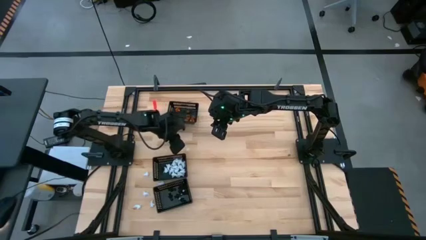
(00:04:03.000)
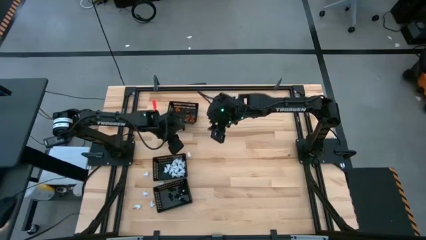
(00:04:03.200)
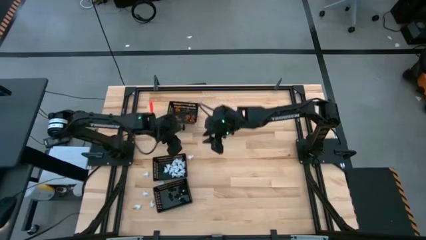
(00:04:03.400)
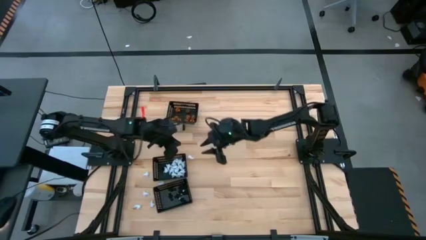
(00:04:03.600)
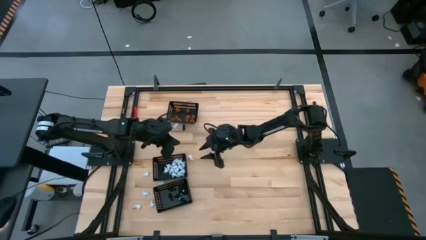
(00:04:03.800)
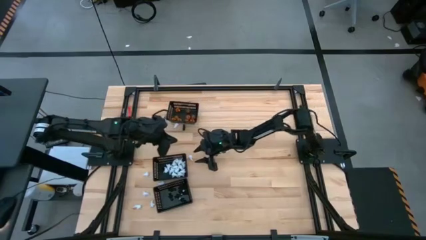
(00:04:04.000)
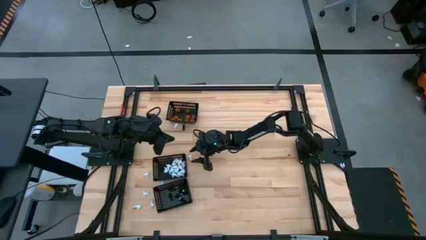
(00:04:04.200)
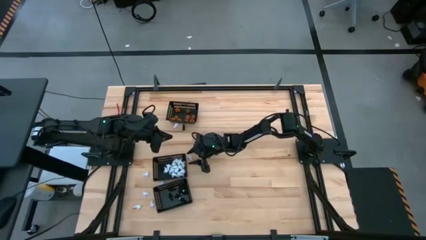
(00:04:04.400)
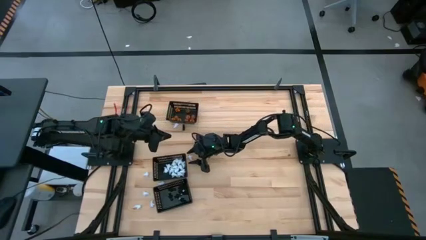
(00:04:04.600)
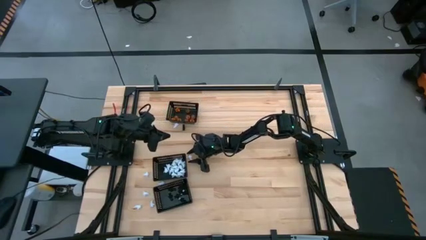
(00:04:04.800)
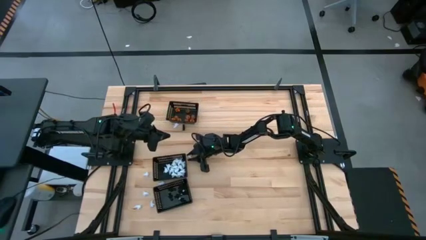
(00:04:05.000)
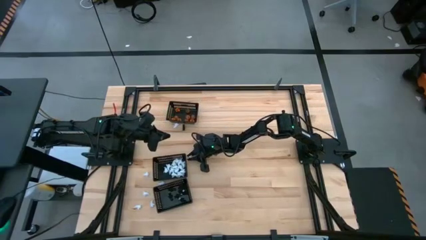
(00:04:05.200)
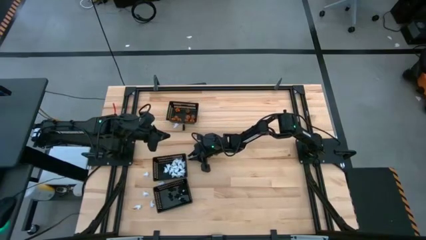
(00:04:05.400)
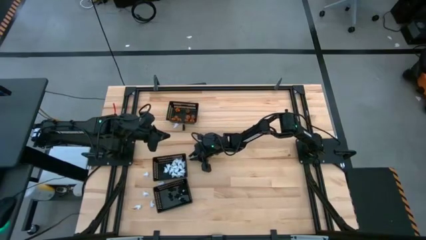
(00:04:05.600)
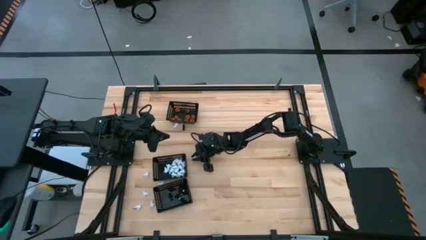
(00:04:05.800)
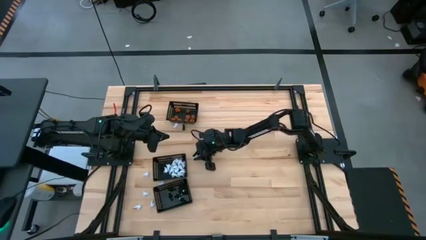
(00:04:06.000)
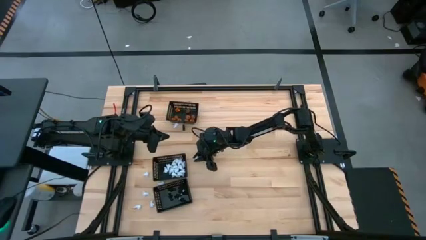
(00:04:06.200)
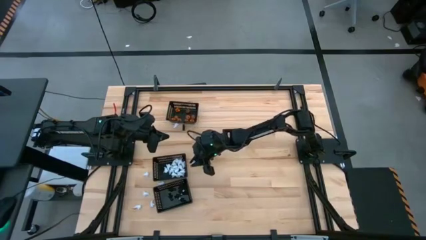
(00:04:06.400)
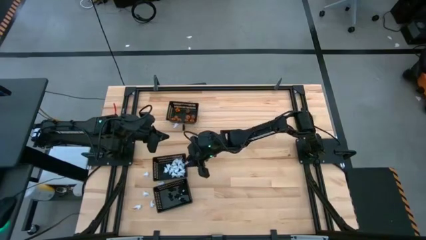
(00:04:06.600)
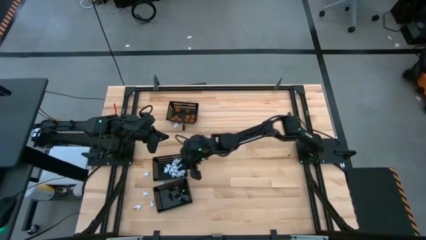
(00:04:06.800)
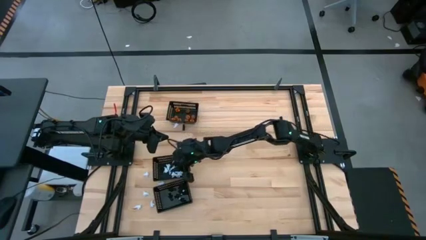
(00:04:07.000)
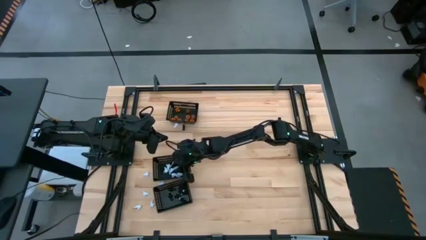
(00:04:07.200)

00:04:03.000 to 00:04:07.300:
Task: Sort Halloween decoration
Put the white toy into the middle black bin

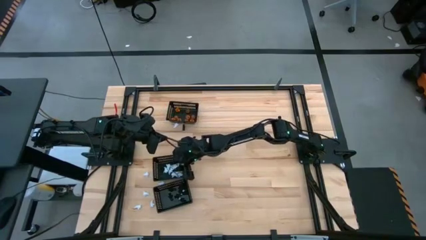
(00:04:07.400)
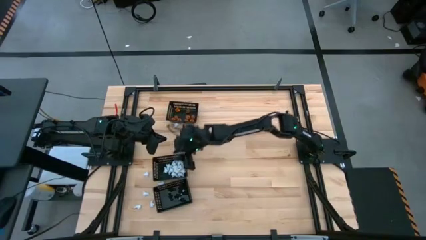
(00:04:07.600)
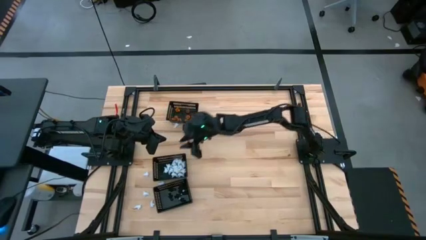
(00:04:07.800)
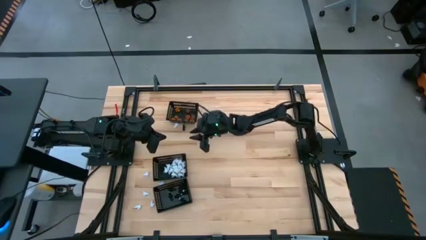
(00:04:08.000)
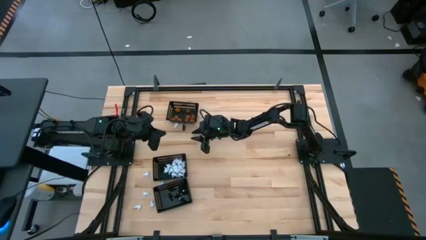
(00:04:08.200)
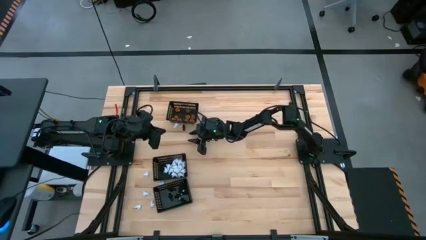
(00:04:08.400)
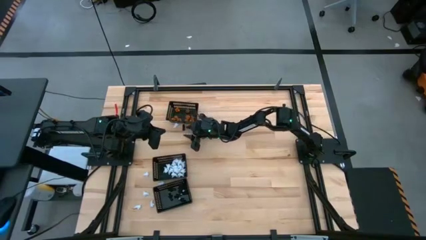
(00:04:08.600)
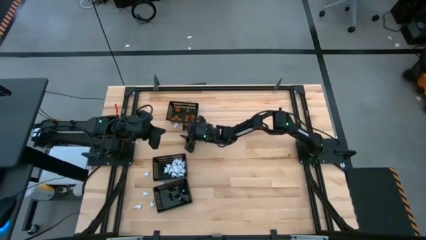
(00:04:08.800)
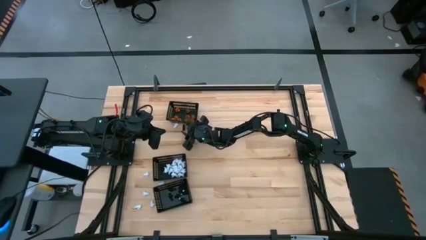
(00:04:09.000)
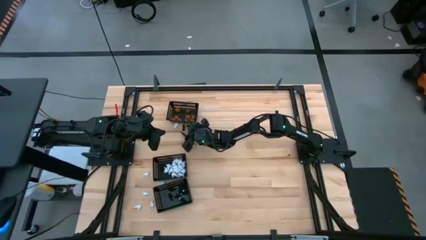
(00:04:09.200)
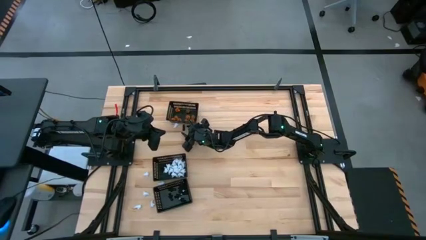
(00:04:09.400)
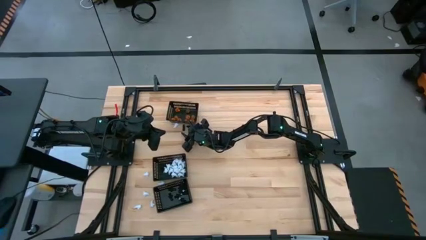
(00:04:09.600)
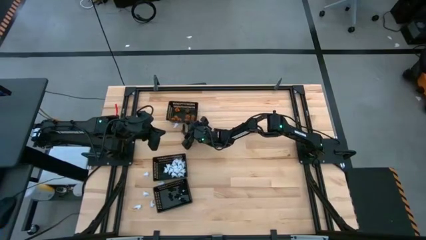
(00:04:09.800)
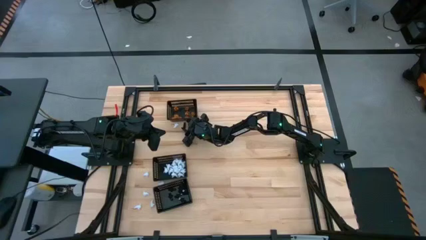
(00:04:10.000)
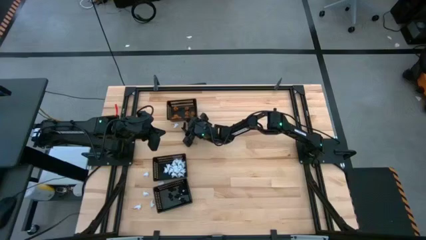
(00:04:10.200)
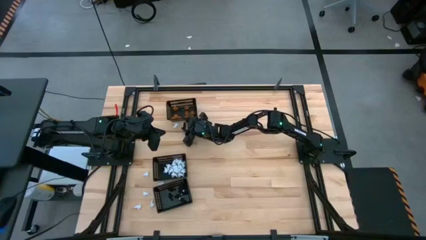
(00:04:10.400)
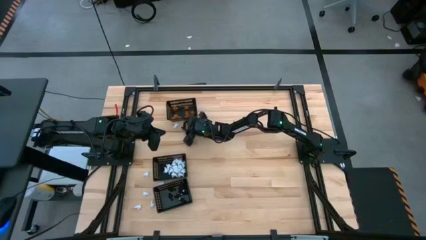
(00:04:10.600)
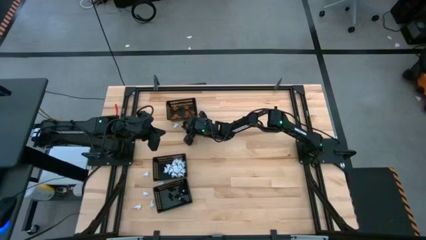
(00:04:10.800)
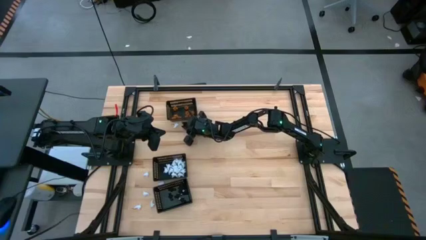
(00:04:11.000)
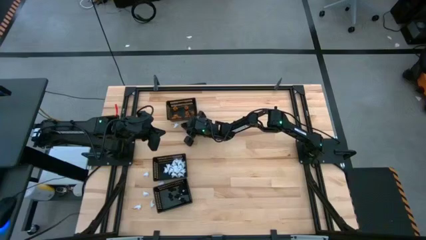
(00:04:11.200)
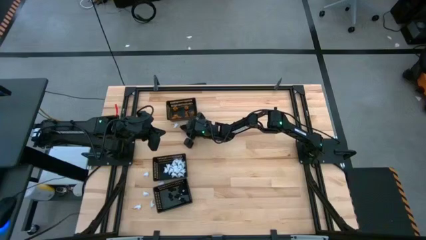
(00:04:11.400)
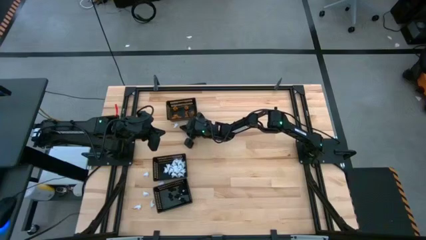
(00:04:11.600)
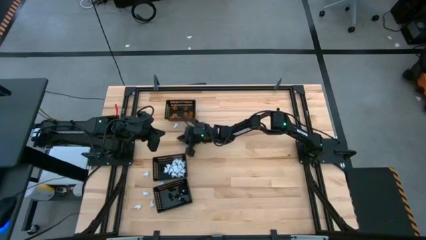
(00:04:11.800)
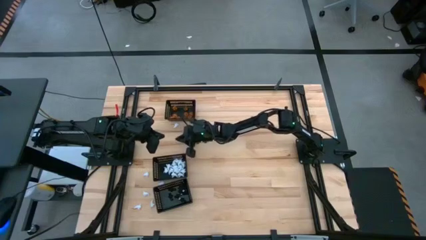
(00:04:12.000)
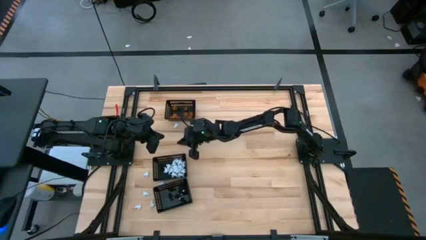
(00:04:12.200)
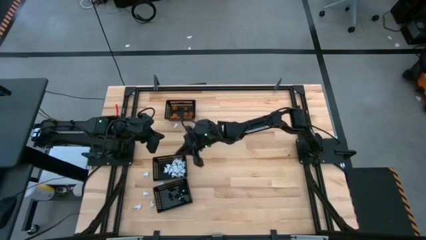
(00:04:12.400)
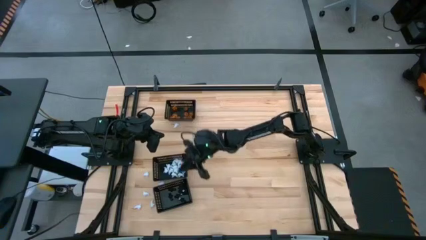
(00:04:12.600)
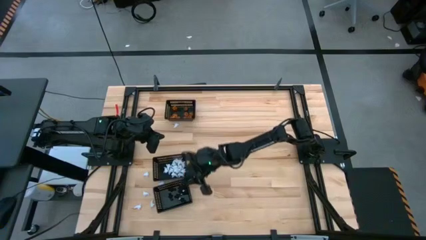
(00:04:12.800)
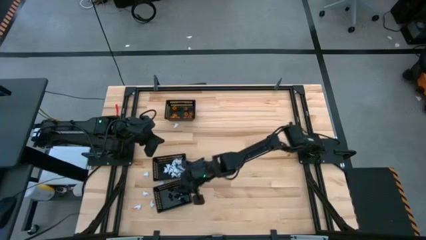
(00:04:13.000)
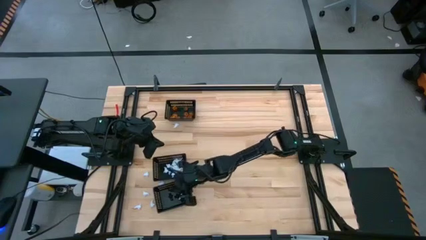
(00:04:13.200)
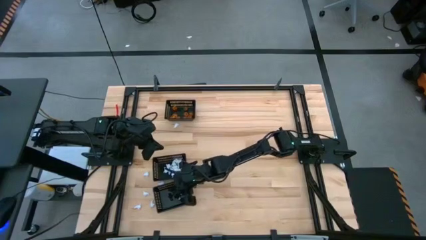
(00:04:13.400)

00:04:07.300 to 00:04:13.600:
Put the black skeleton toy into the bottom black bin

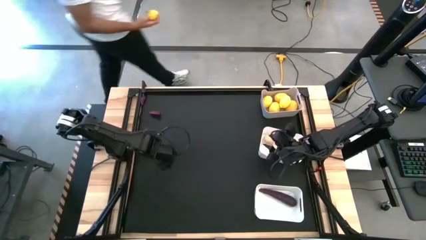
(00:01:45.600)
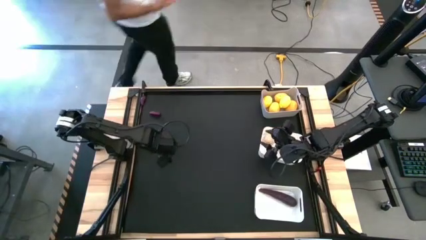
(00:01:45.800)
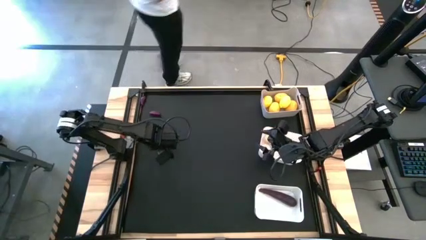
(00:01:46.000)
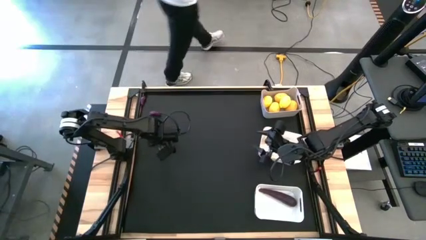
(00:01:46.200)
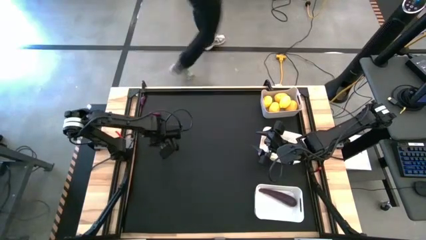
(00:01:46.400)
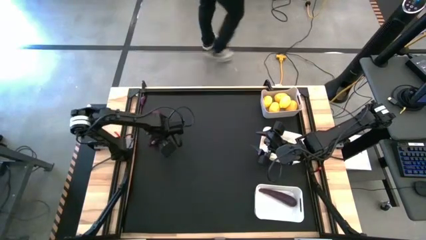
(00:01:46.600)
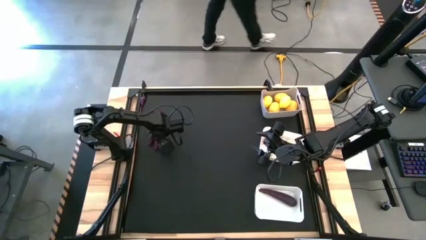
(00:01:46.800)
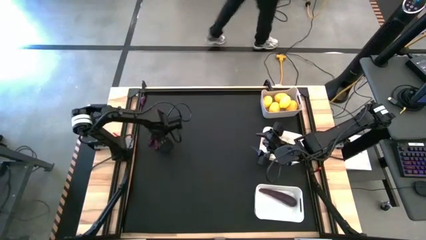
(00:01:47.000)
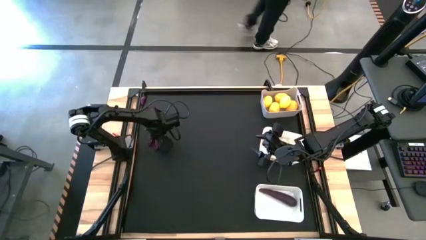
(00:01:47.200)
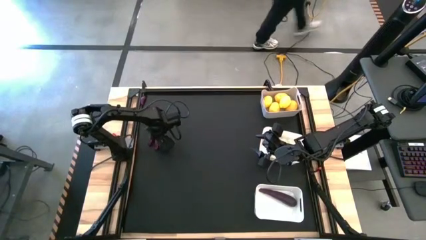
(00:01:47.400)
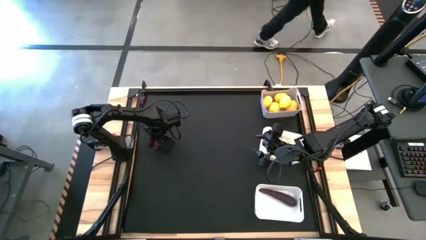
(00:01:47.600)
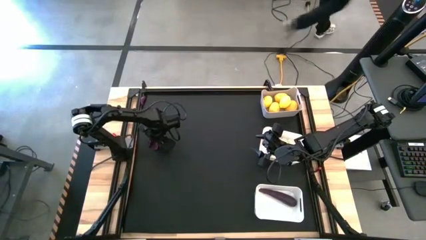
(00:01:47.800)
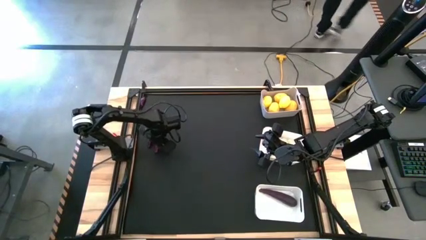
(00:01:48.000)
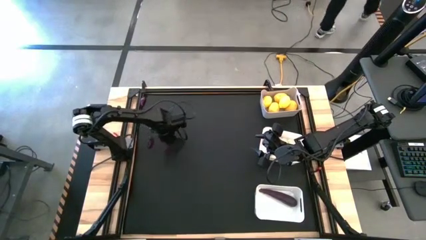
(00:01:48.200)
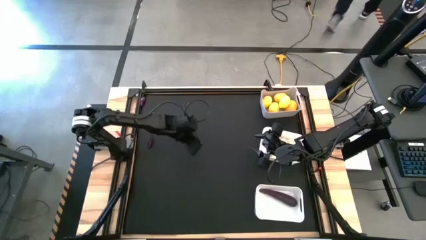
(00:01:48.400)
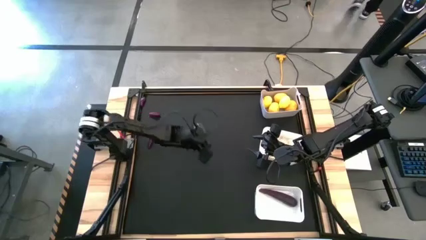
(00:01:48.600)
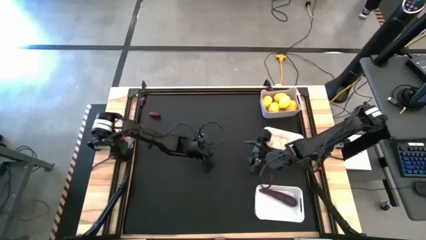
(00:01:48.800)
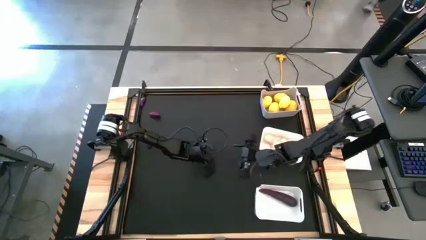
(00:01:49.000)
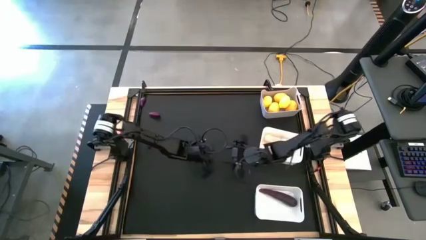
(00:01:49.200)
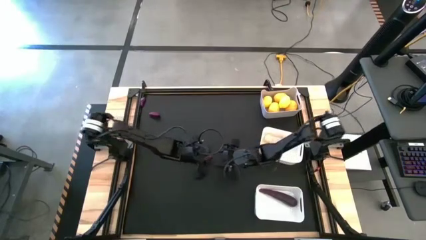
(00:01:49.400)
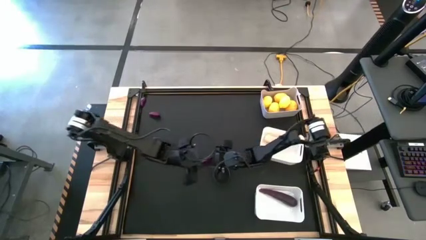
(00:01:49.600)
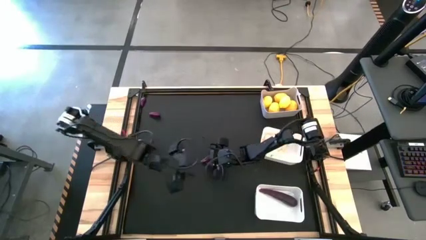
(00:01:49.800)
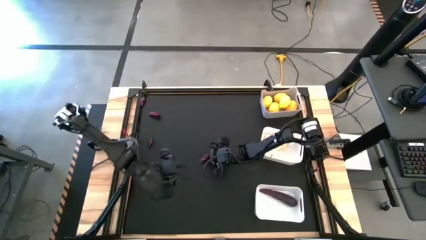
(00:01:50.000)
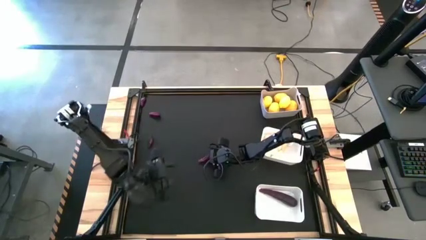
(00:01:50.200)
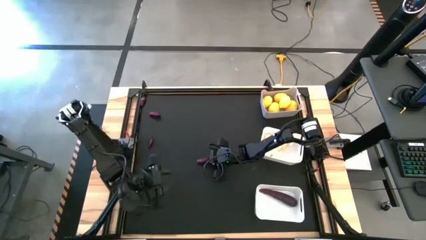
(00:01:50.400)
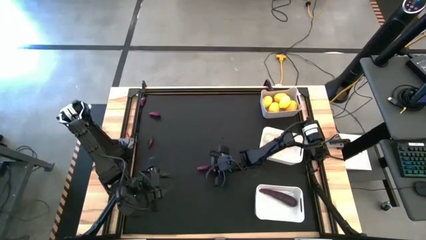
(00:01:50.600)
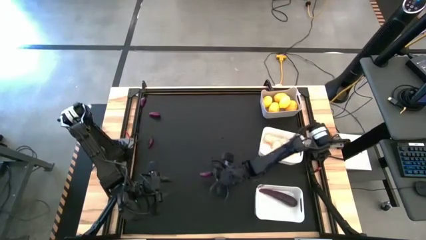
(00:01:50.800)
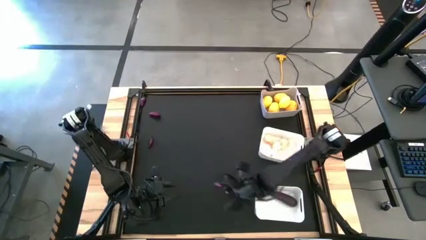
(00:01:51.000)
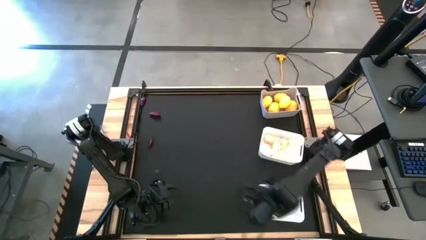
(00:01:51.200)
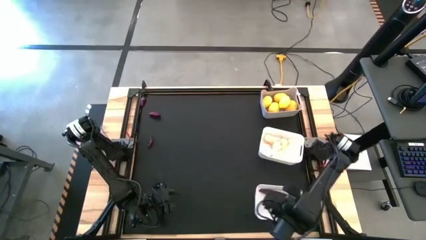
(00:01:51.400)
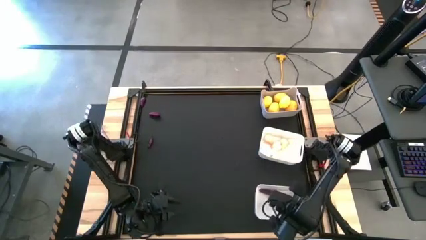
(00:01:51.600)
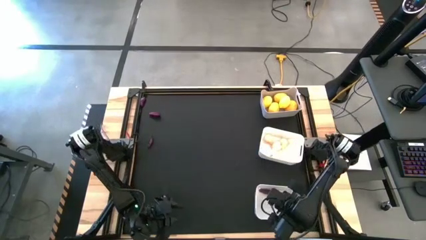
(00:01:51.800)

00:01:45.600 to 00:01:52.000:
Task: Sort produce into baskets
Put the eggplant into the bottom white bin
